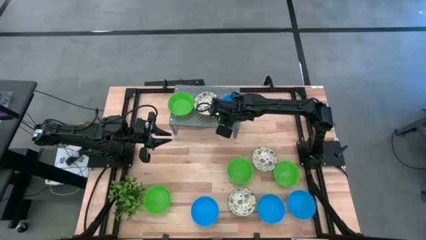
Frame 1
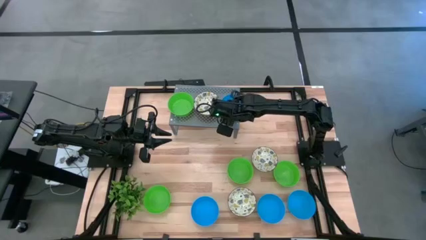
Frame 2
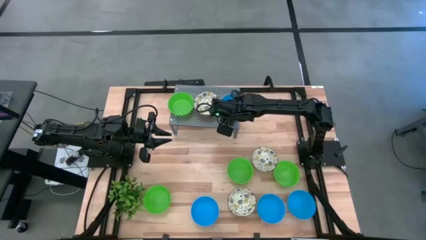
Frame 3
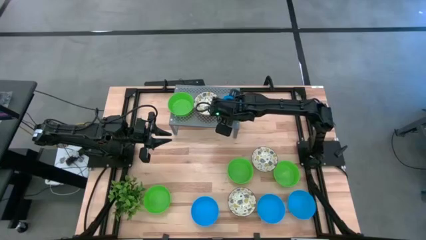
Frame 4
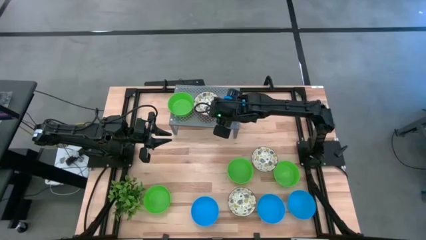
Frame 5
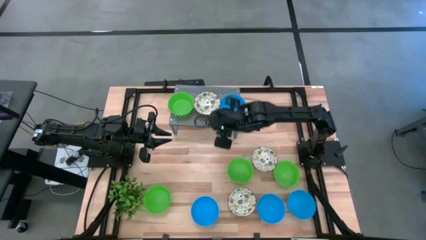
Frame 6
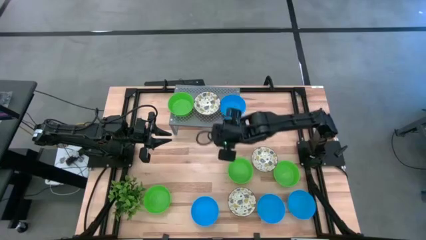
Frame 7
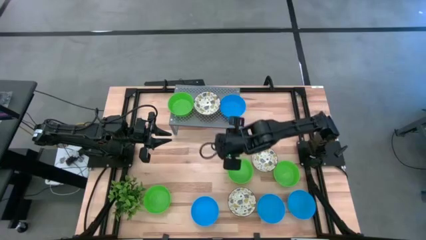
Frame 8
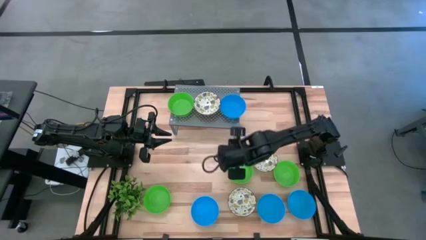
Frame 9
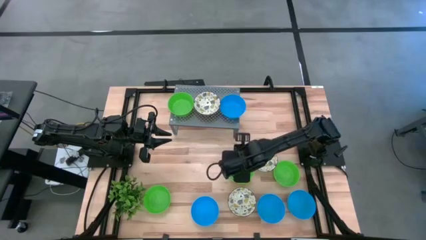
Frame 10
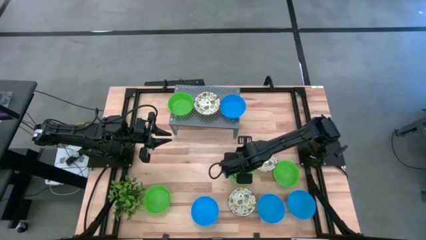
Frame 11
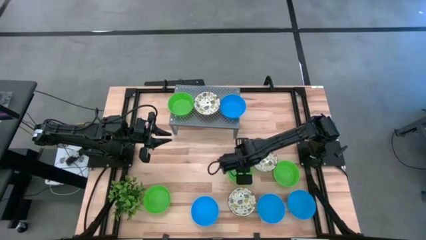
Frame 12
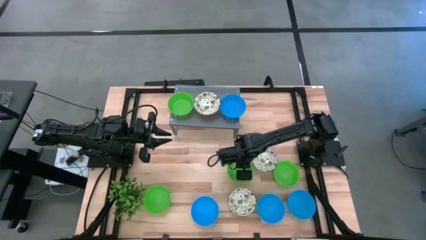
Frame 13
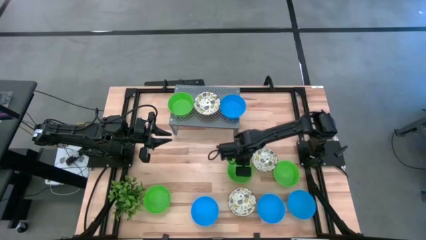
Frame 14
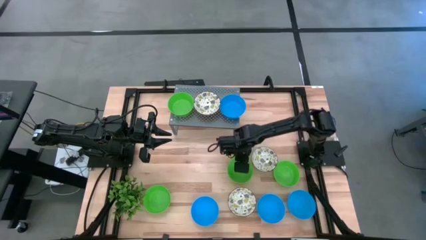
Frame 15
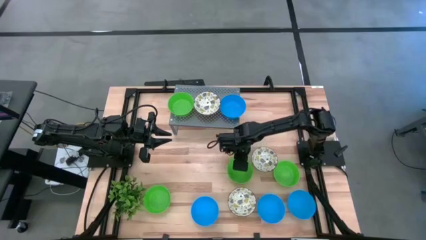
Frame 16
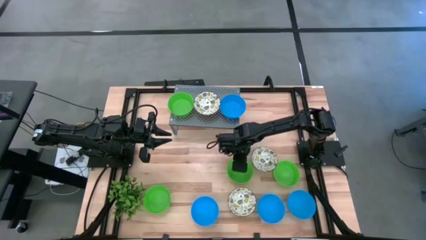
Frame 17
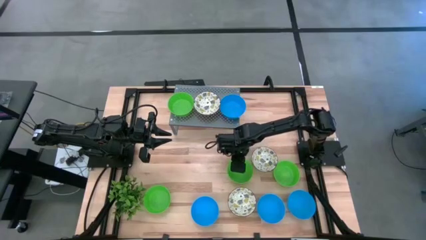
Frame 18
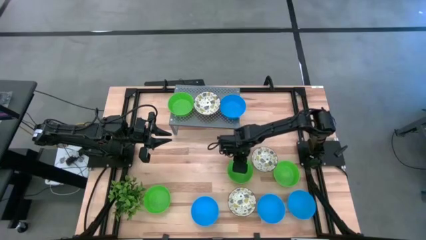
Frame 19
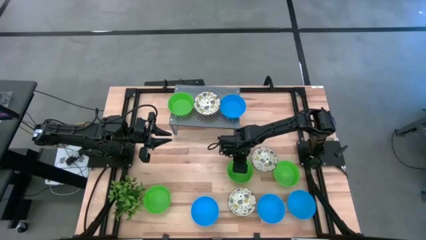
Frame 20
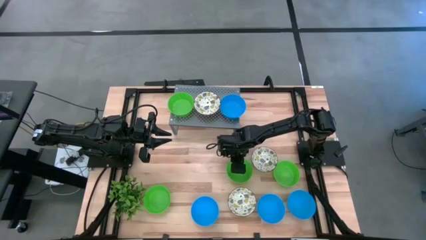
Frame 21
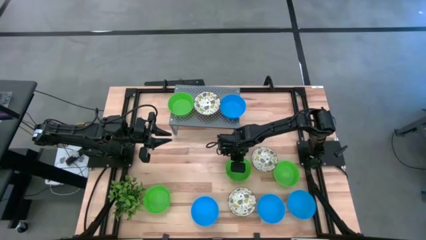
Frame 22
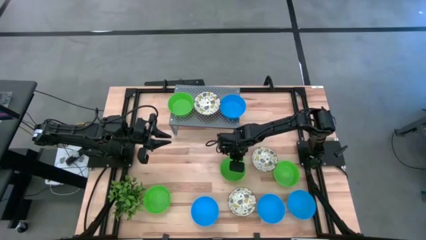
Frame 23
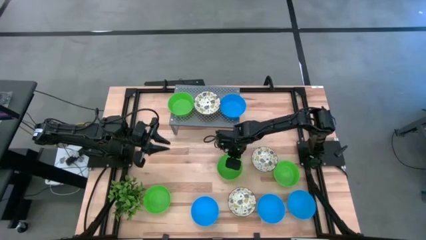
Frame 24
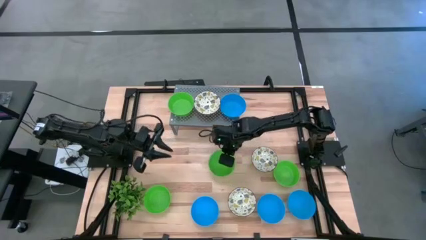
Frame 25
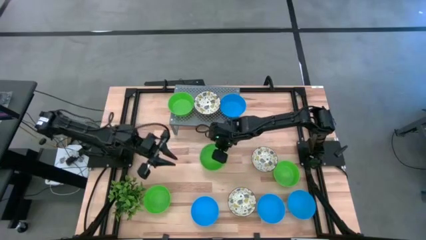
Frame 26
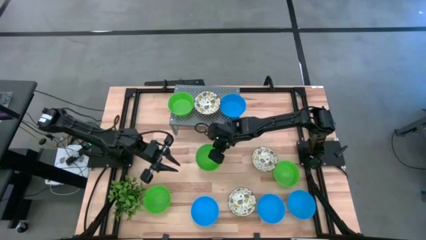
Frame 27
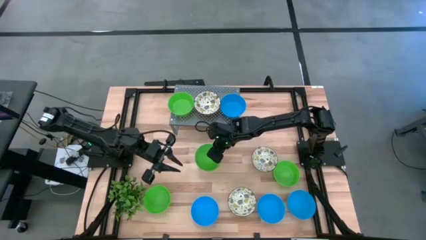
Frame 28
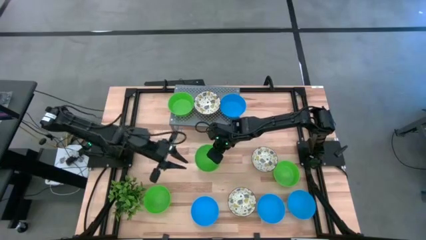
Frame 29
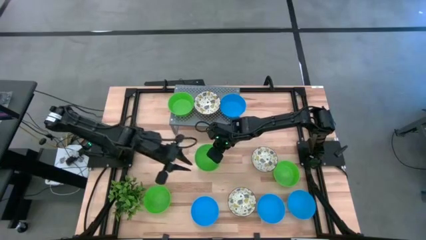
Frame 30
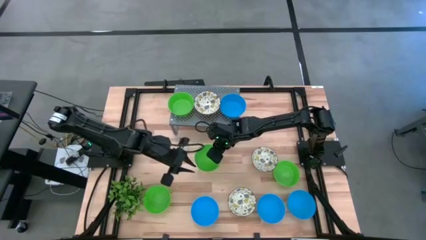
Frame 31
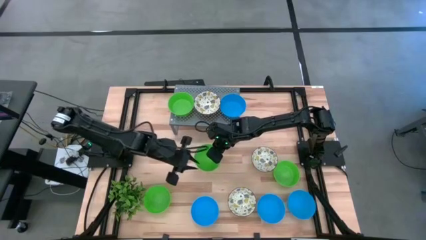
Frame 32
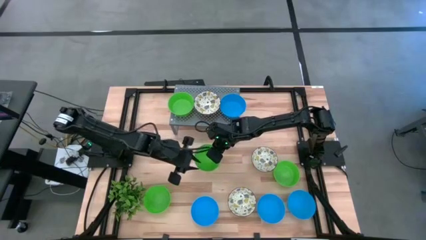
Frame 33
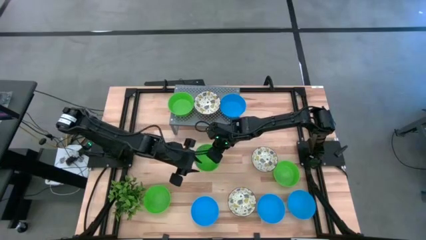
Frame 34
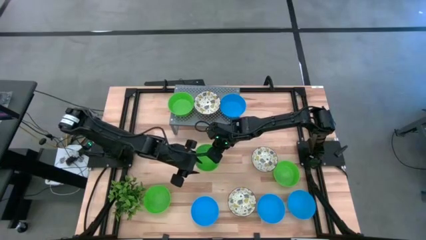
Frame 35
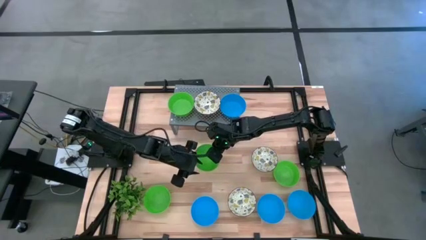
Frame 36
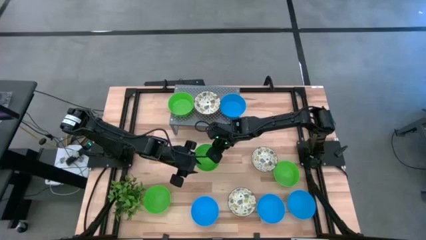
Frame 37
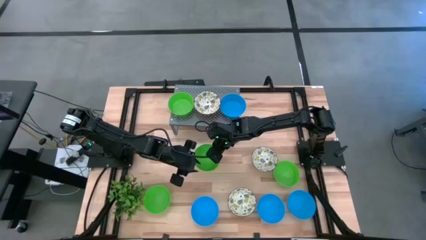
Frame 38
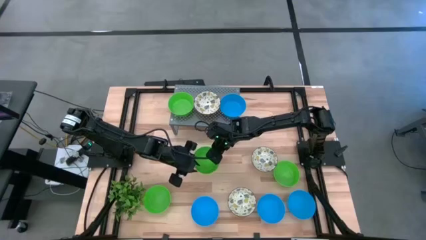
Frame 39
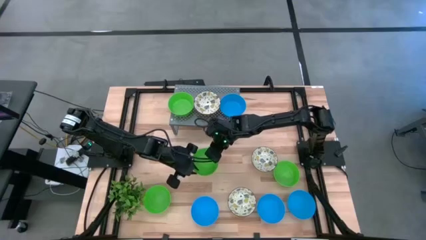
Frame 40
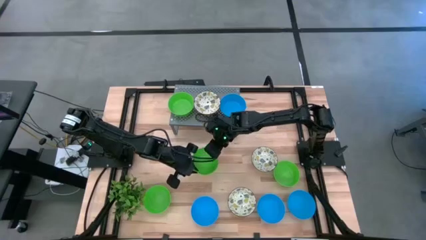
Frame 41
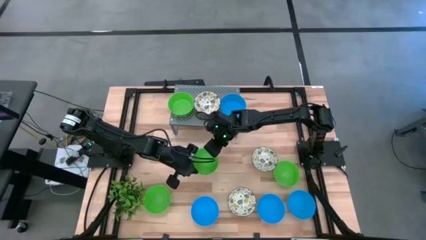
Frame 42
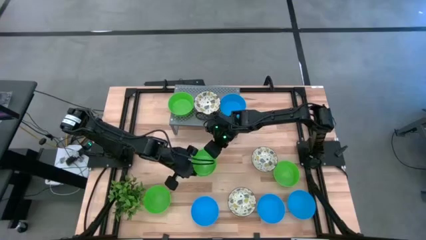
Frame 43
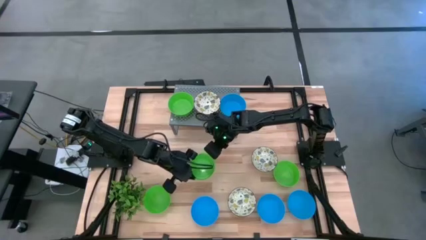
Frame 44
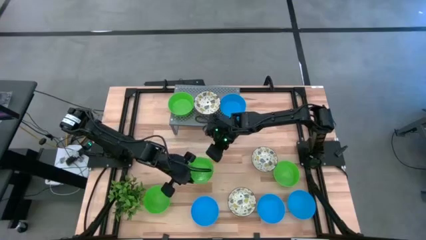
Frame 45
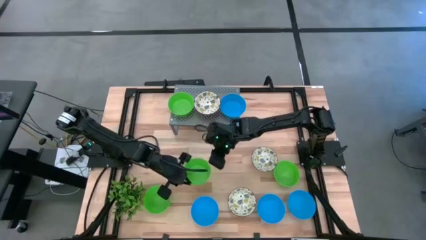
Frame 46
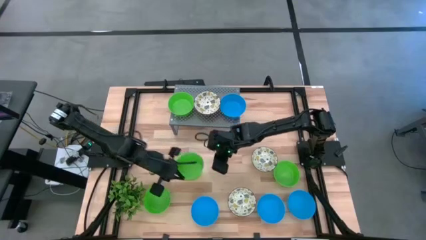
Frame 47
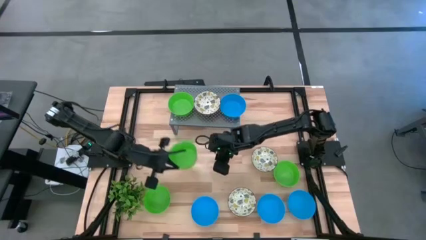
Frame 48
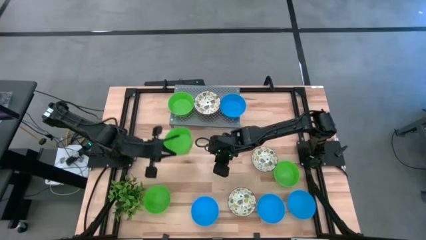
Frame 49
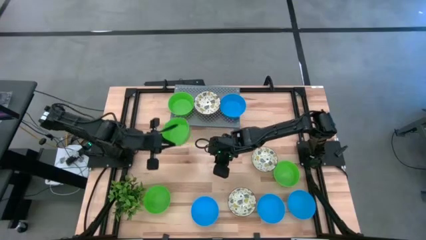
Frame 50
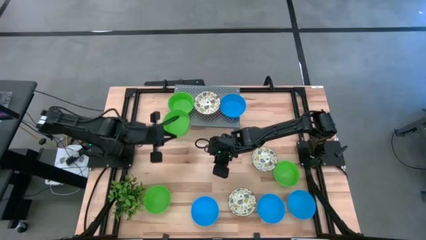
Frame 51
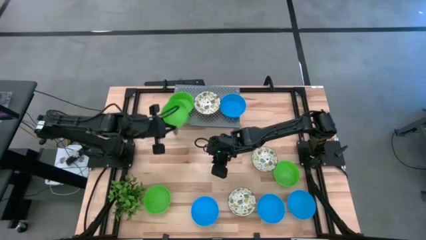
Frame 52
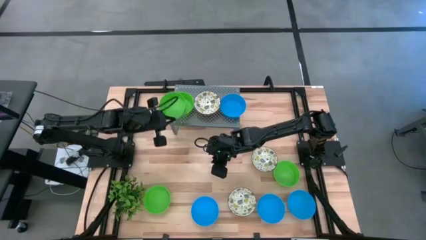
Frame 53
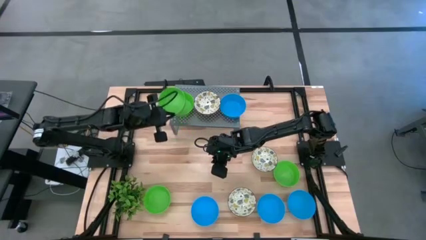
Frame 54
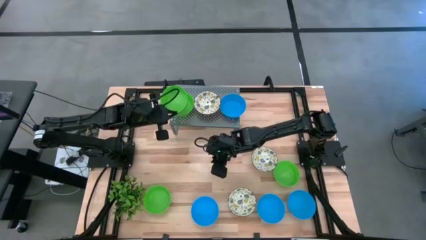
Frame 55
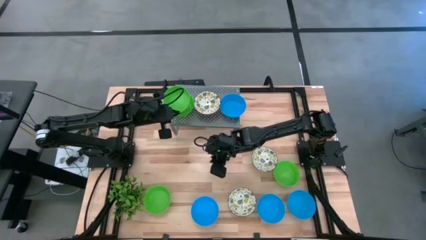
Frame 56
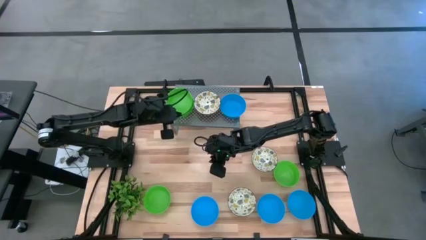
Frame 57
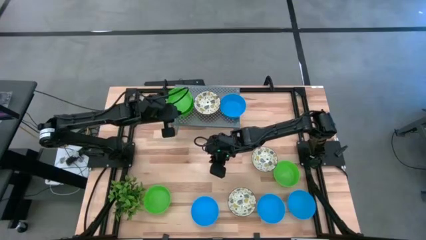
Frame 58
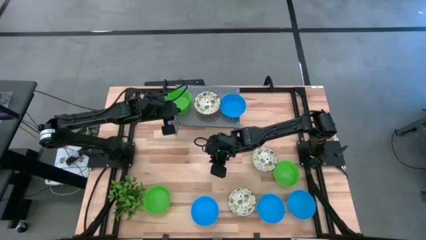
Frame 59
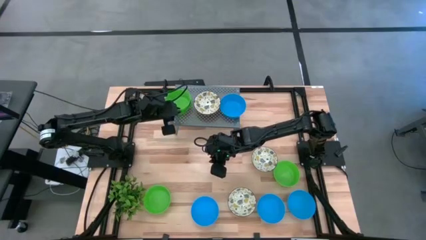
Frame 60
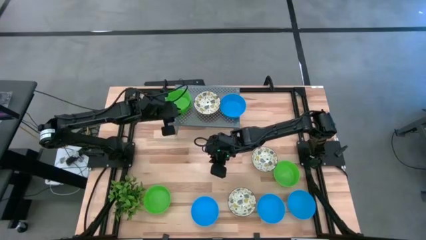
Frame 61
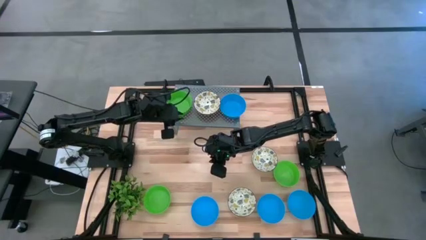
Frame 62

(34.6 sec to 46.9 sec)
Task: Pick & Place Mini bowls
Stack the green bowl on top of the other green bowl on the shelf

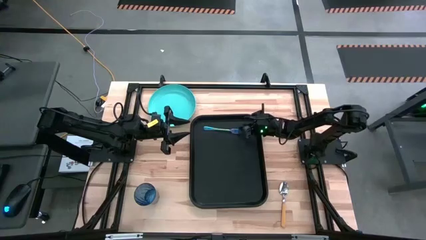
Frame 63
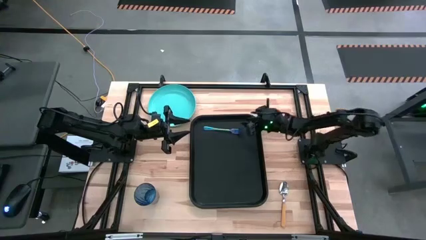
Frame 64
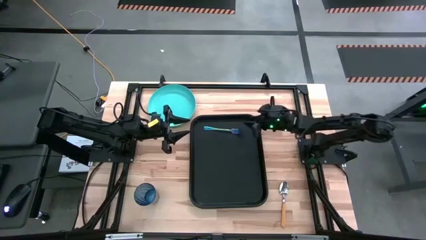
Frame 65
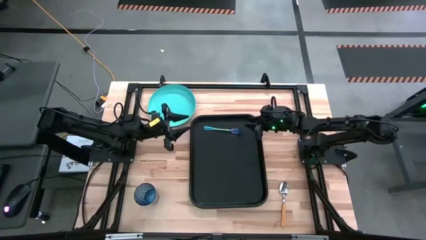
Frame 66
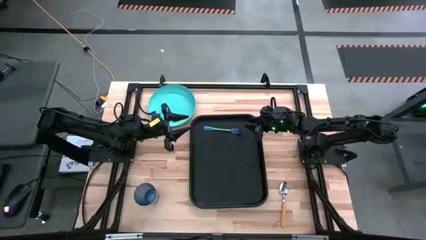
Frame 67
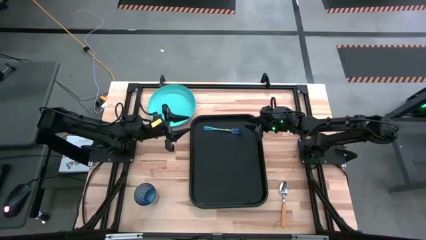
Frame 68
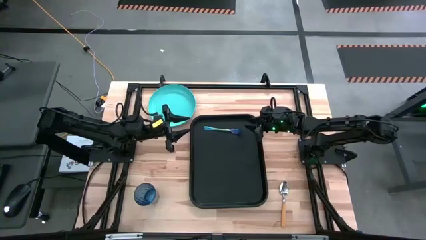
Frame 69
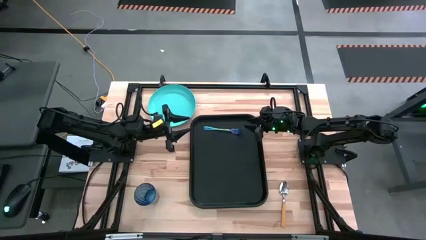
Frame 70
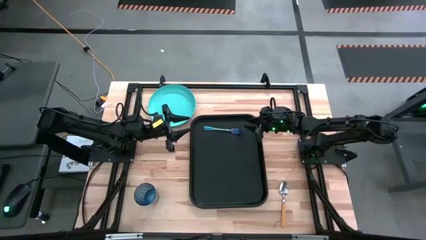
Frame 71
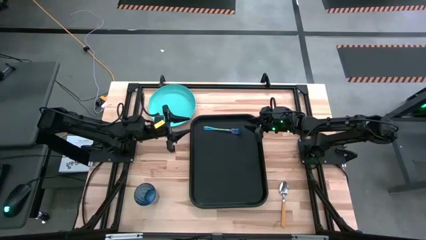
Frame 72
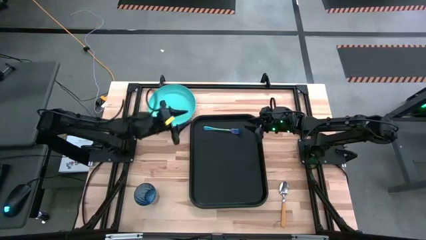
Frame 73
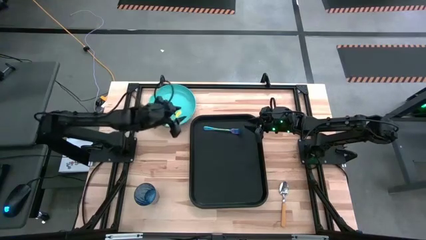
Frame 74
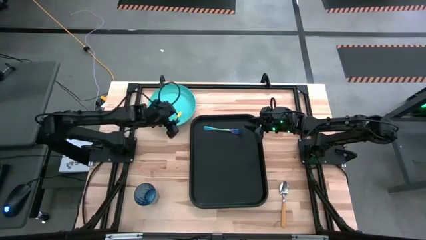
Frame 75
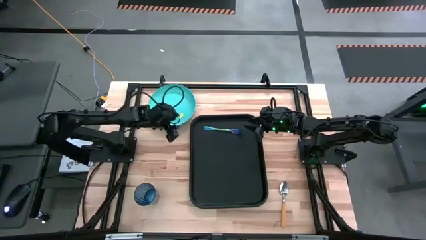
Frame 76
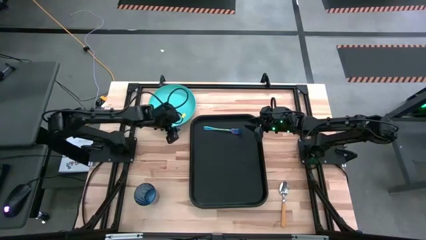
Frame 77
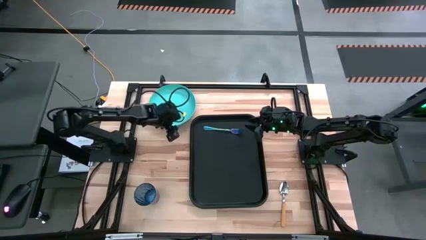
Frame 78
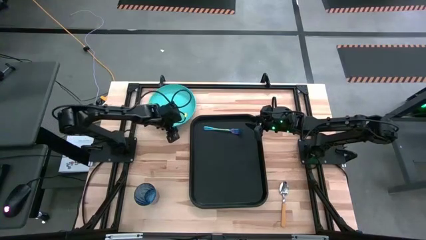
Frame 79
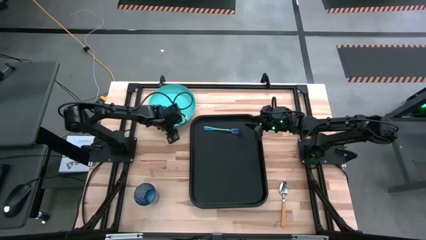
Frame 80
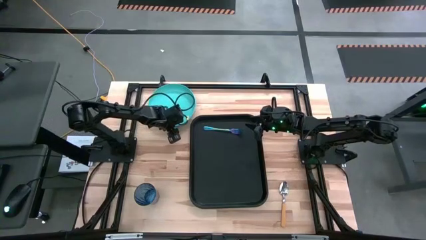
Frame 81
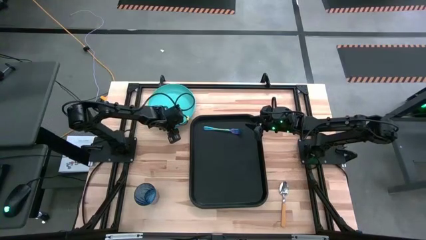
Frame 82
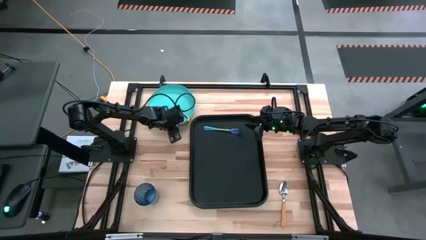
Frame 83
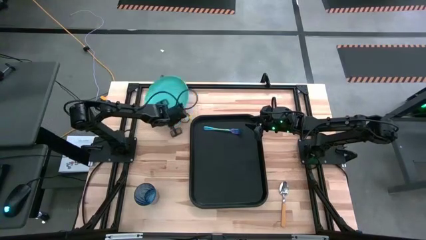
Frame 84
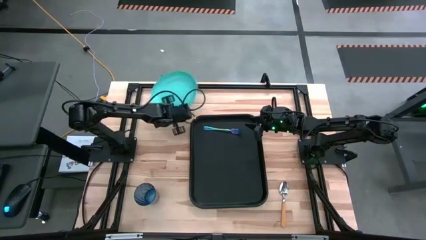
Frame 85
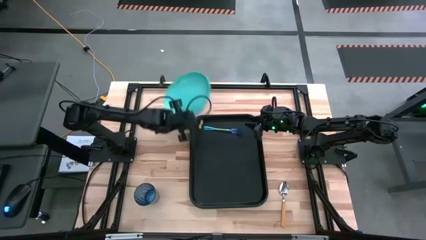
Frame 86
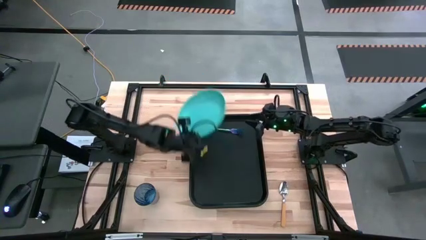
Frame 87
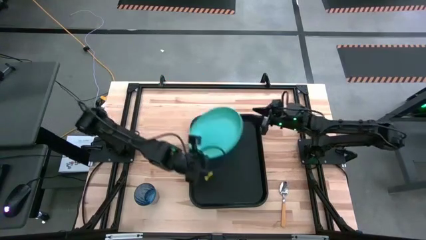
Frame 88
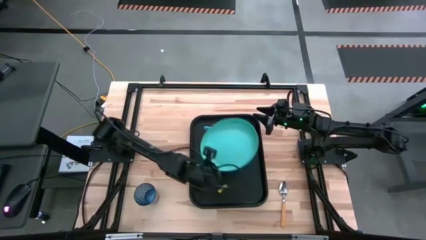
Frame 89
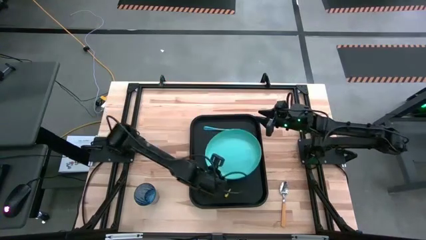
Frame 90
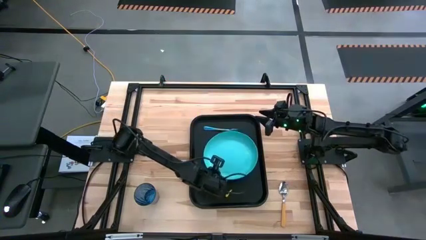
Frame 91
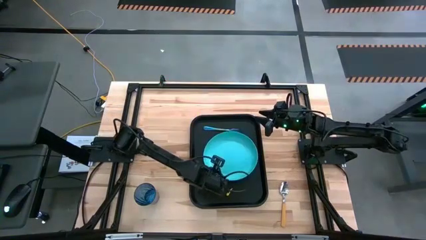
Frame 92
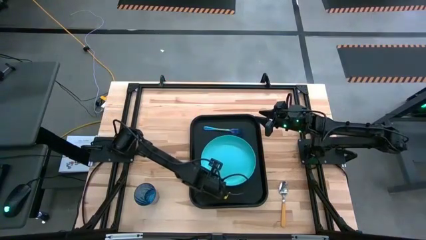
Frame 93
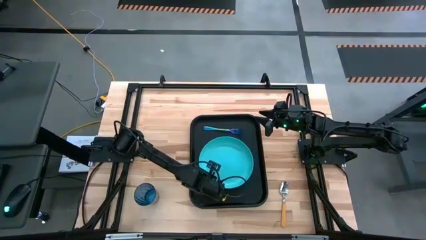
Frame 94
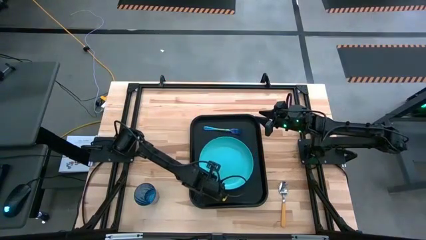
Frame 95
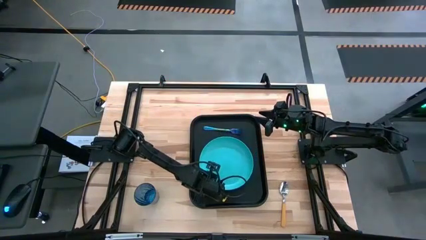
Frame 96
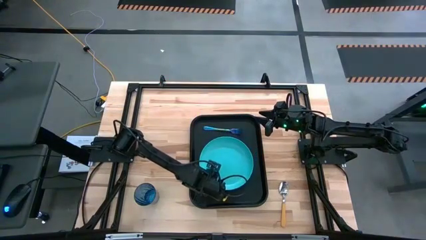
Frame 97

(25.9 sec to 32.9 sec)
Task: Pick and place plate/cup/fork/spoon on tray
Put the blue plate to the right of the blue fork on the black tray
